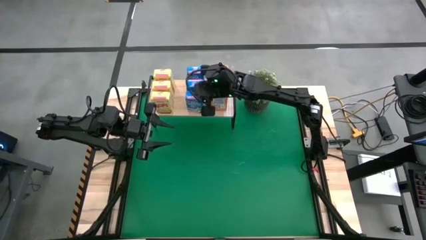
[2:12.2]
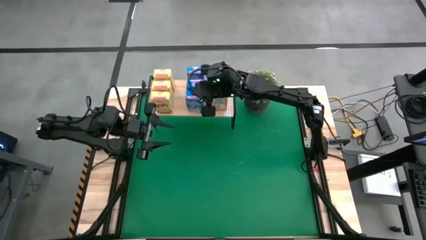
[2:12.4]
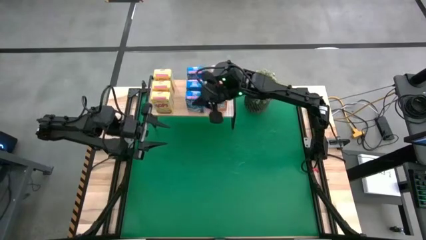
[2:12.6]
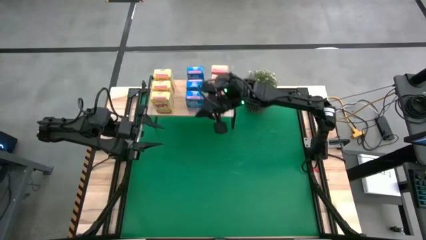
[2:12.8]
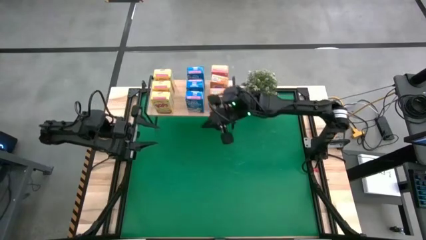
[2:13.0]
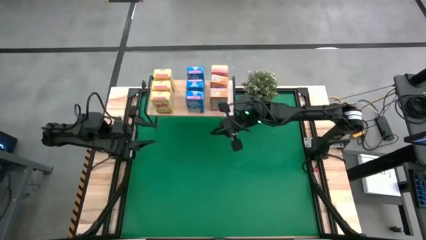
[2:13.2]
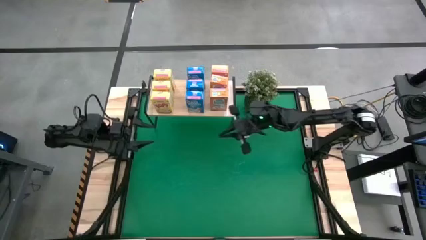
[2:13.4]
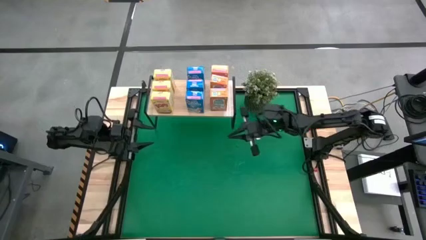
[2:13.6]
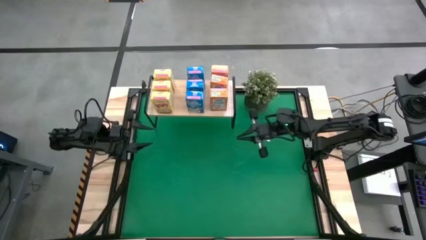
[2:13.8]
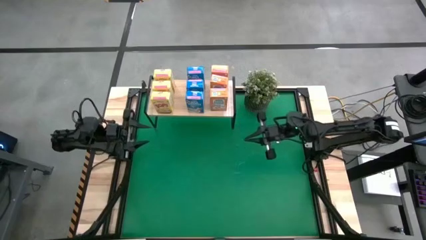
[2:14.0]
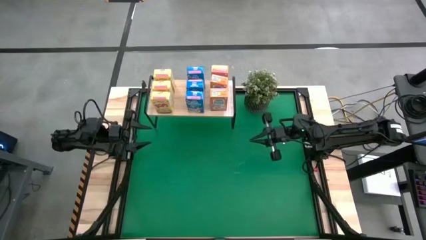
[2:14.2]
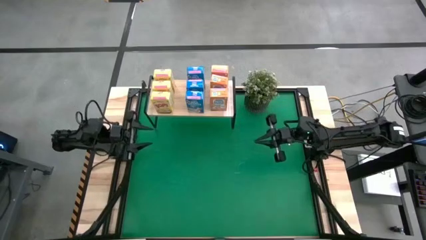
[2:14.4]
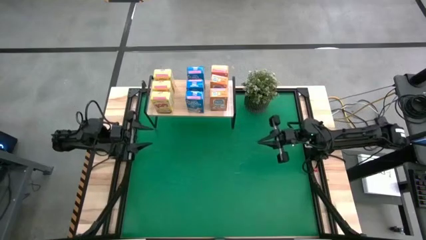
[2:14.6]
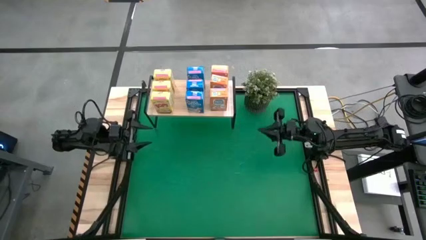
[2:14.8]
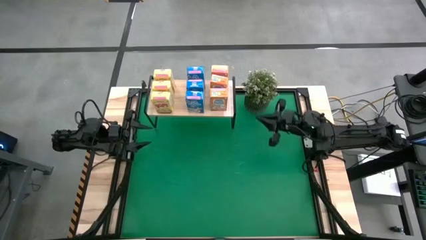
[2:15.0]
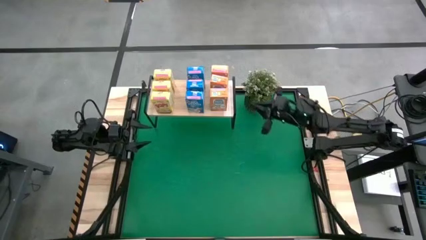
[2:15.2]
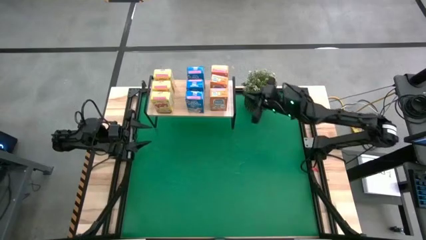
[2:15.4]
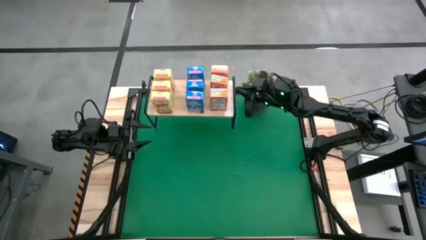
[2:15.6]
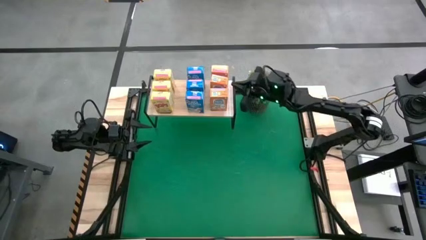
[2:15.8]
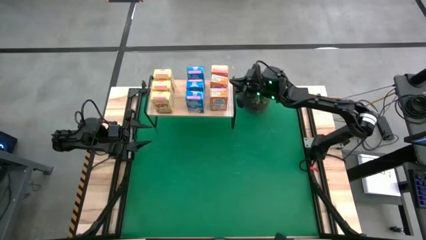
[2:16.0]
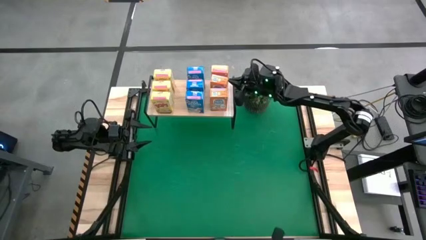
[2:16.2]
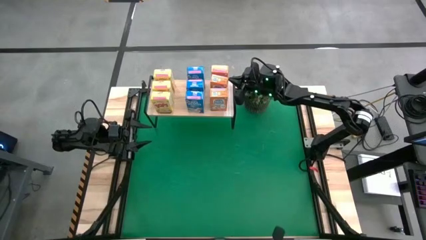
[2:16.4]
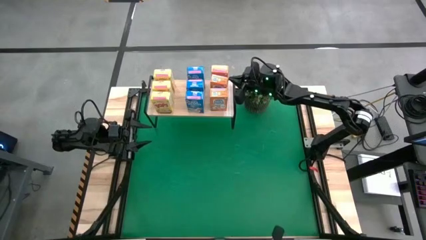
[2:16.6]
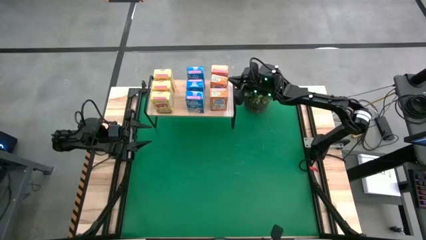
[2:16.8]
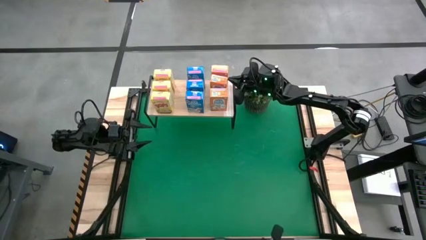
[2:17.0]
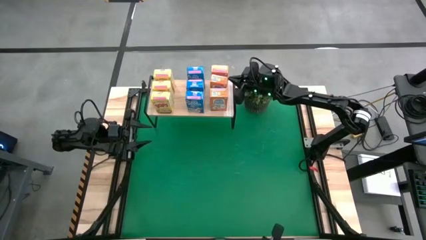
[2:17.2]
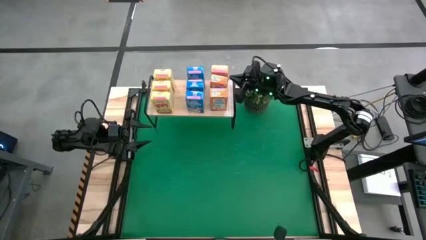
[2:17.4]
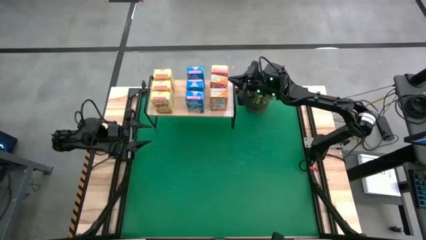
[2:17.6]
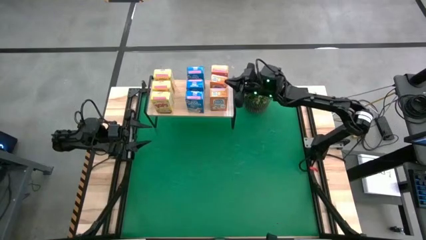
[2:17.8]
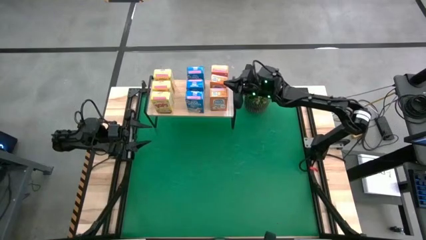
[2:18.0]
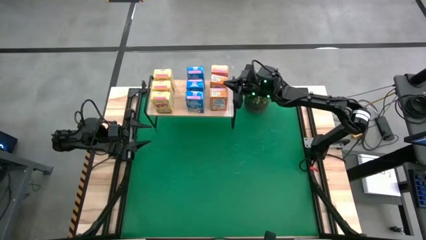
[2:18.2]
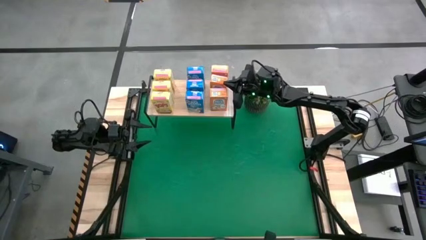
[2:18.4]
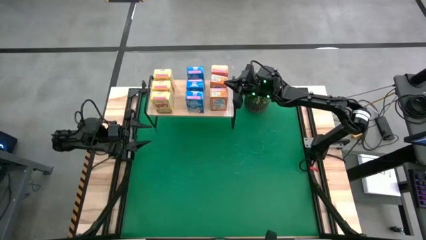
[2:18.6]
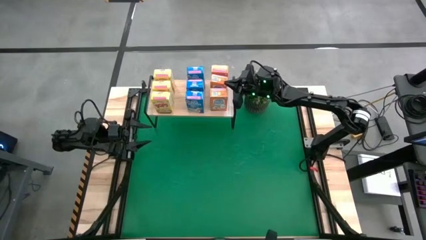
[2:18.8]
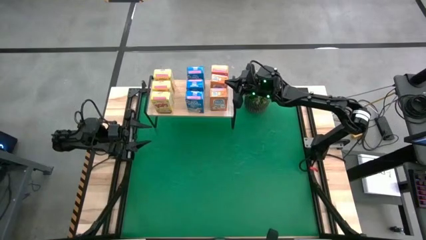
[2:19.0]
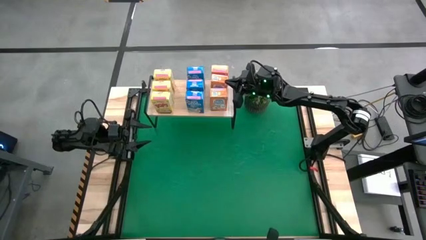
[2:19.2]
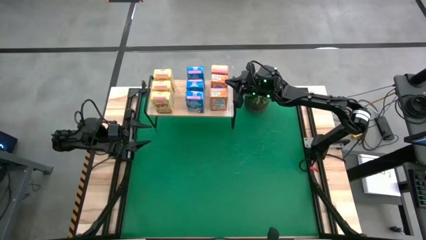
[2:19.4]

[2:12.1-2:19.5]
Task: Stack cereal on shelf
Adjust the middle orange cereal box on the shelf

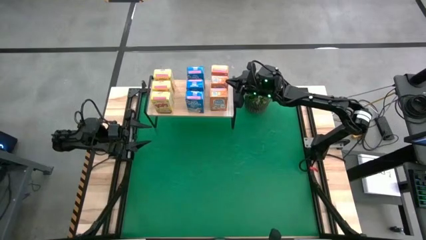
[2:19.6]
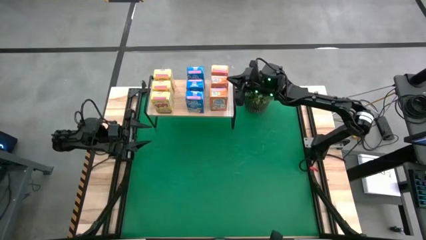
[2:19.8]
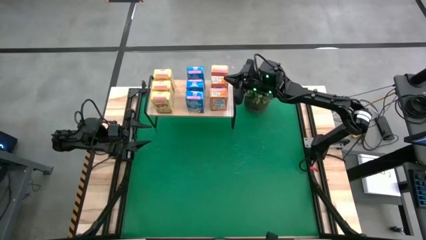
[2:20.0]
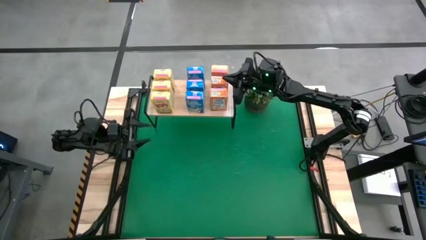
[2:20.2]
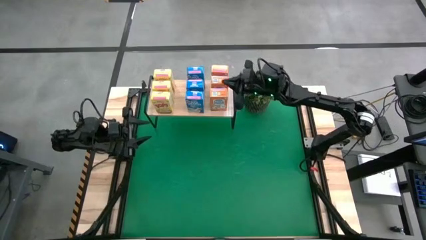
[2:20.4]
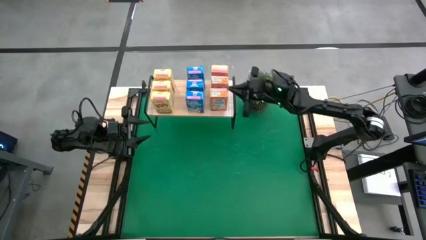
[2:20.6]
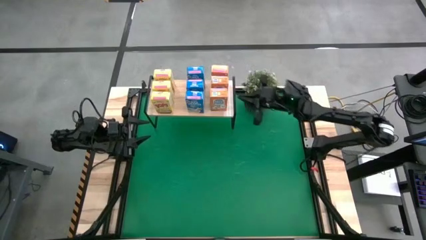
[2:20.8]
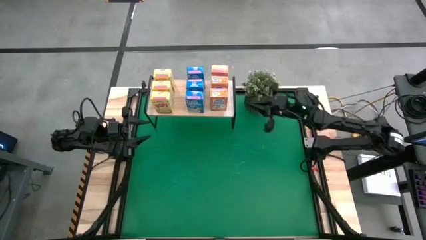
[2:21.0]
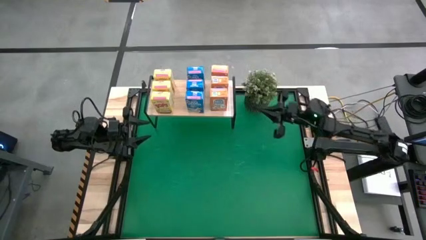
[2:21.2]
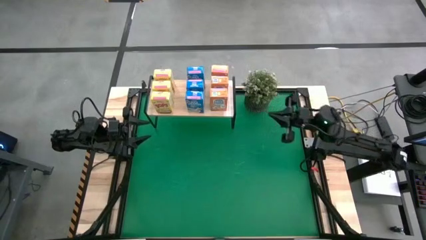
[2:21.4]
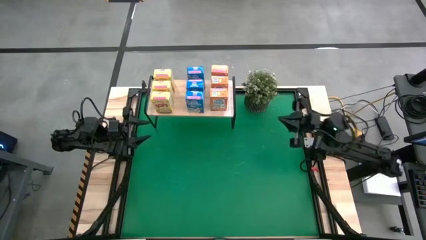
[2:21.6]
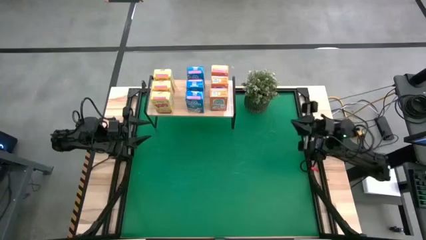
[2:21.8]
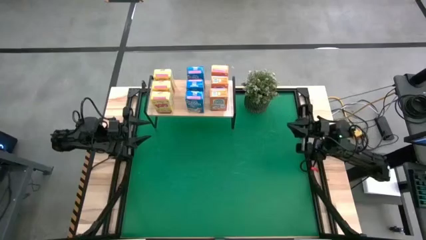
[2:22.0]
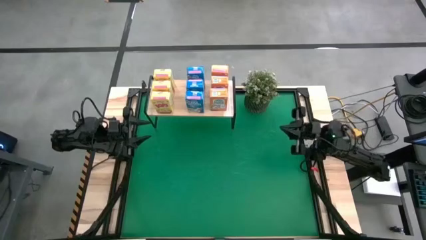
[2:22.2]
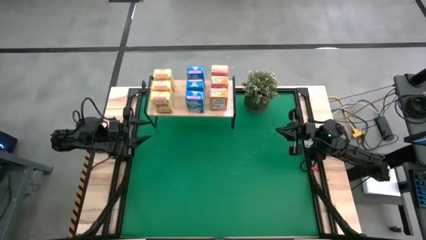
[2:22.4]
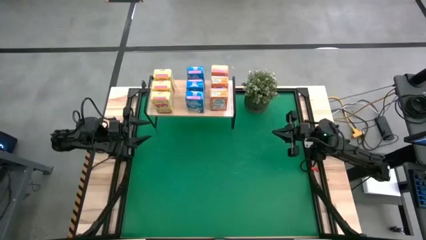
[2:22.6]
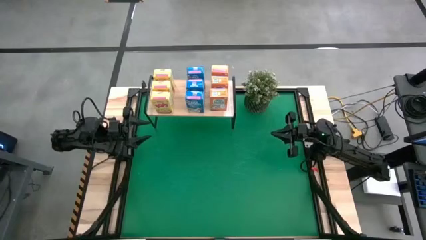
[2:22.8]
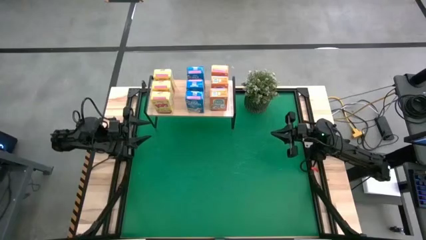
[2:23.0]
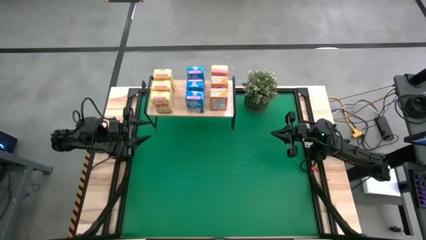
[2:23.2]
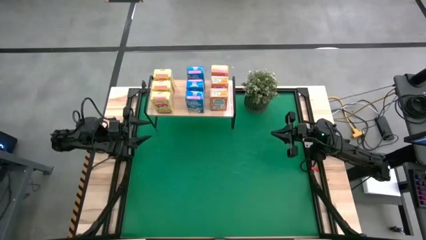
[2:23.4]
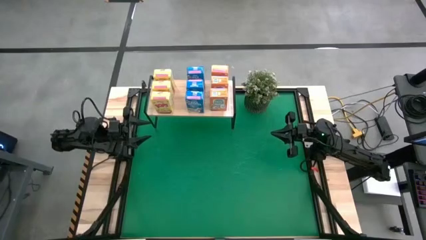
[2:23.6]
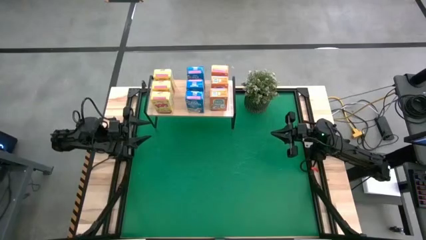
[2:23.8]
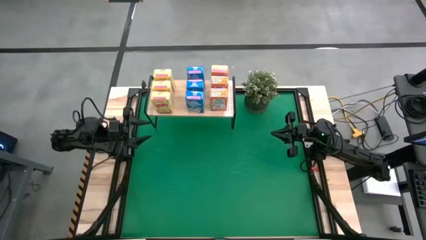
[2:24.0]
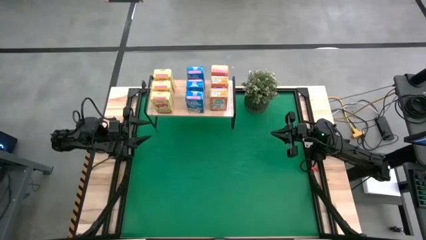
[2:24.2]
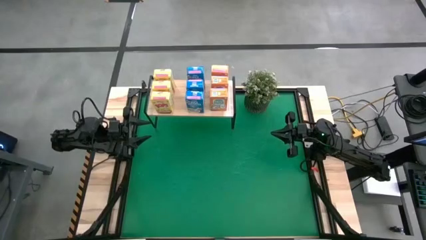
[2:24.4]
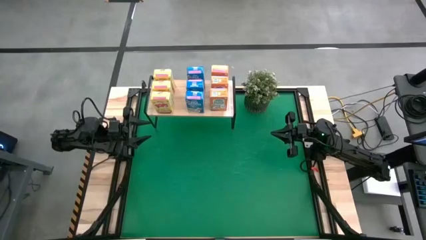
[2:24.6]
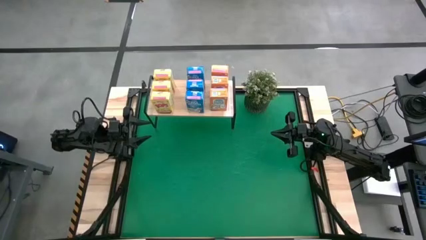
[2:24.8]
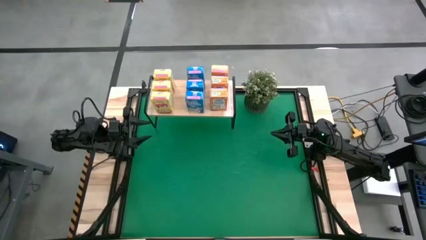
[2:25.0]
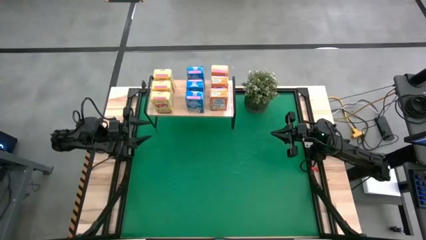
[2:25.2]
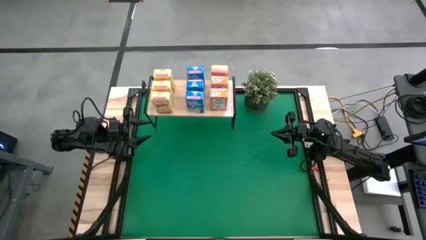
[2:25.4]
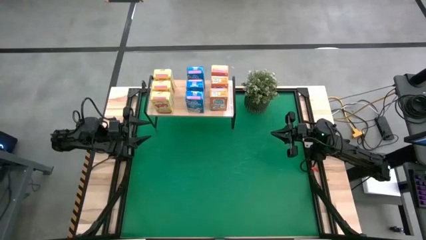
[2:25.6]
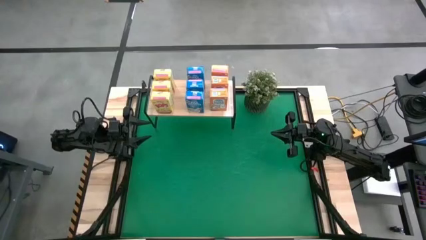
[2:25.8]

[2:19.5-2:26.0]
Return to home position

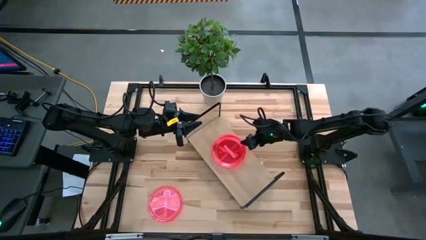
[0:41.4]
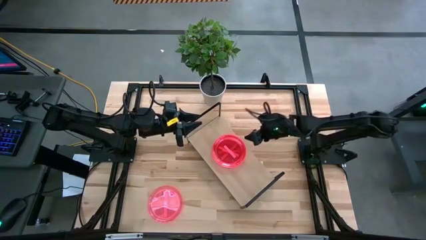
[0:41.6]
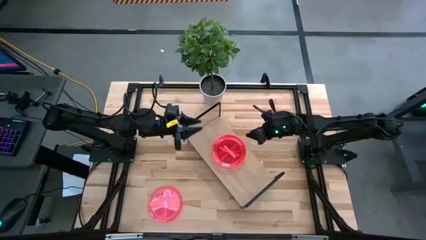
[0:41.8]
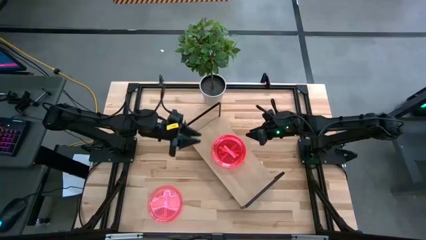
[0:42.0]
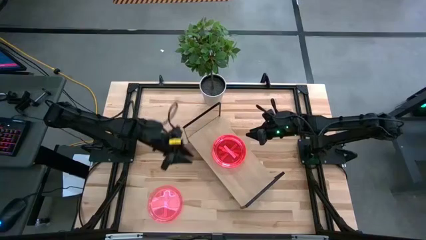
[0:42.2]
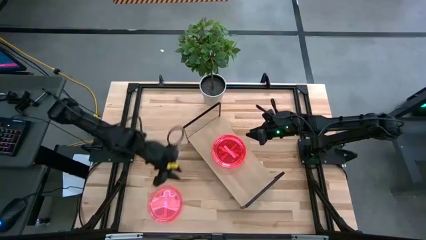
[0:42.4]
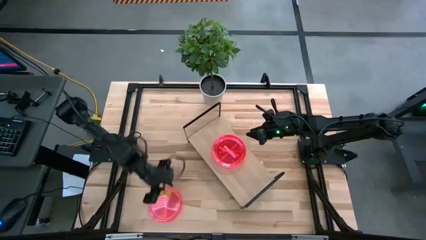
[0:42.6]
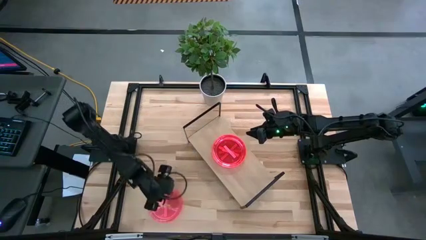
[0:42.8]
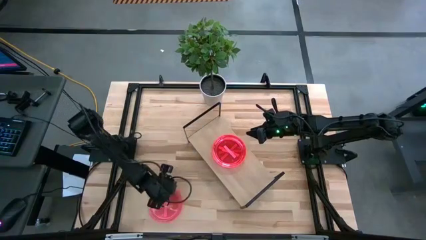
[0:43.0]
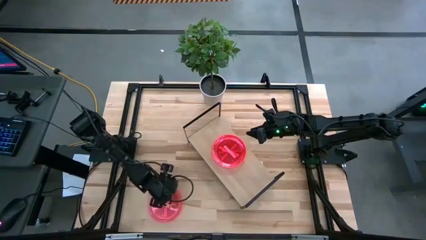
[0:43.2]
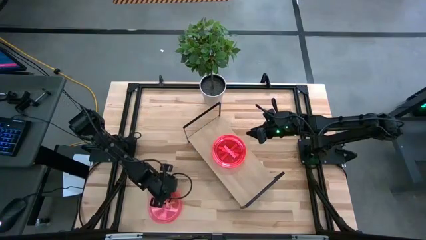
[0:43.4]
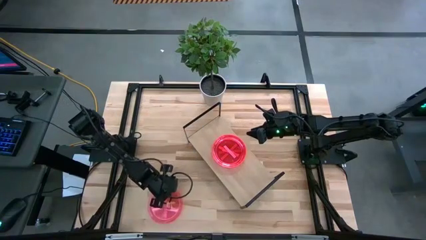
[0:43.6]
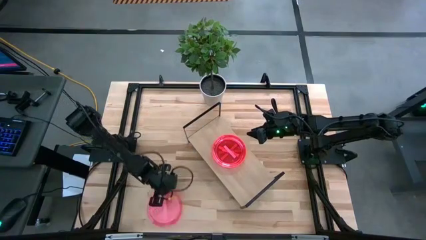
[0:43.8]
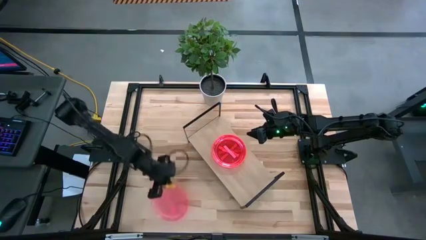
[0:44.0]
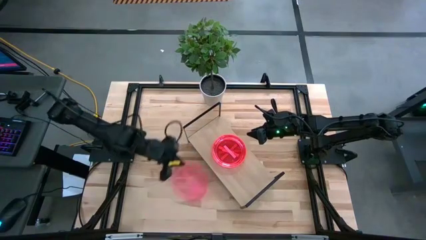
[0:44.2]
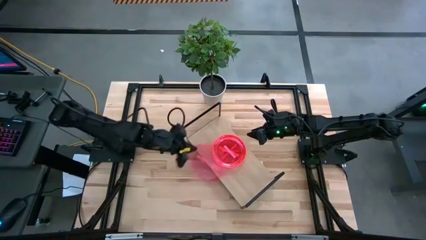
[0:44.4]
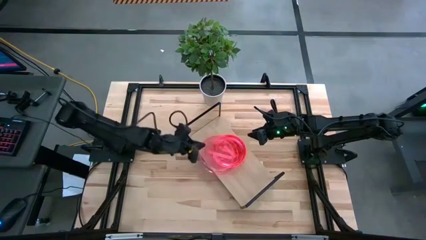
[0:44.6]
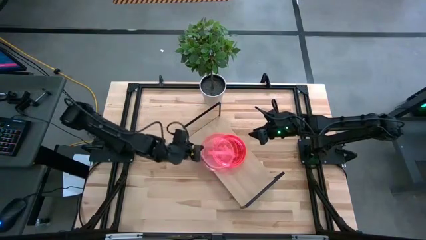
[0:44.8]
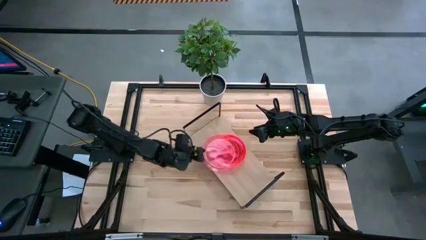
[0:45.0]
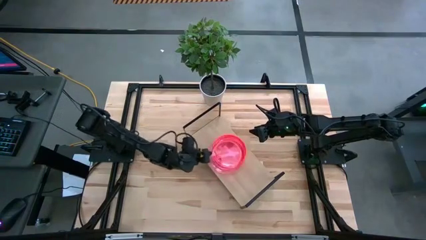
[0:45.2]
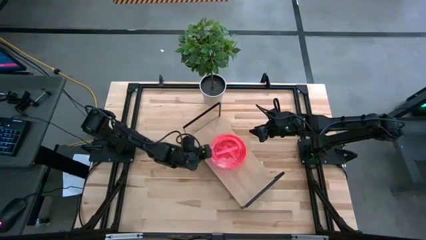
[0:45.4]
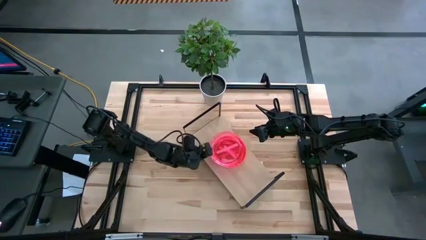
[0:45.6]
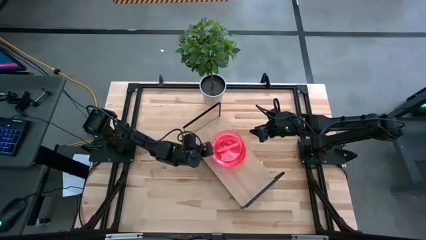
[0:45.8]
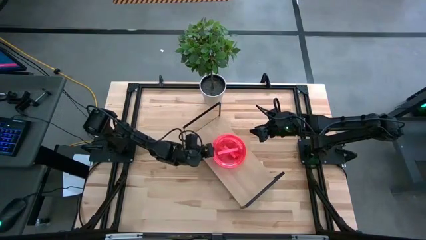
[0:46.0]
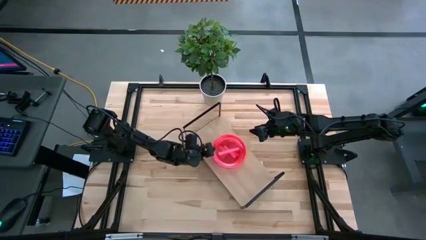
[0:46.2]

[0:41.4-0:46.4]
Task: Place and stack plates onto a shelf
Stack the pink plate on top of the other pink plate on the shelf
